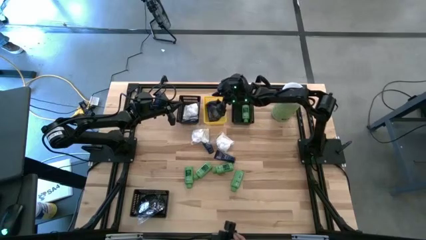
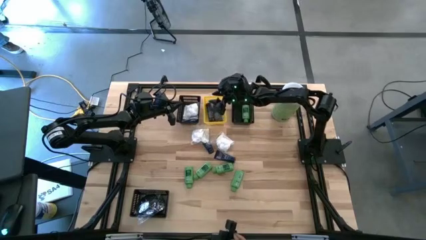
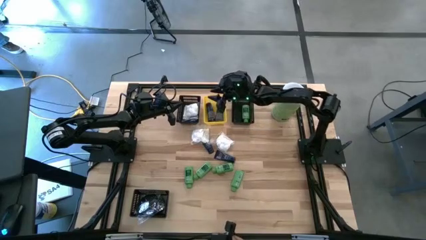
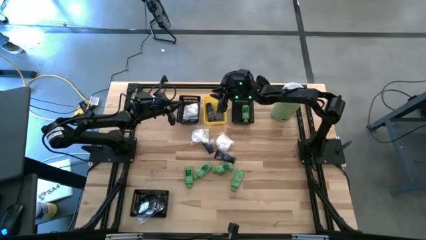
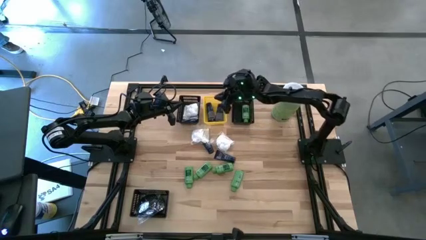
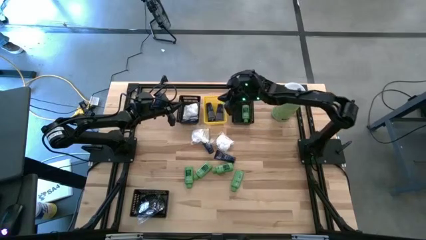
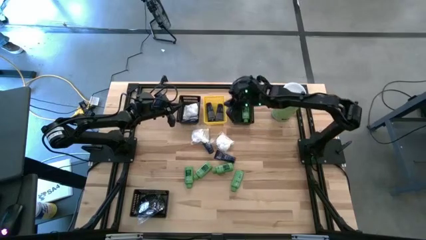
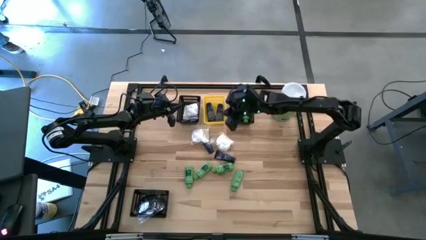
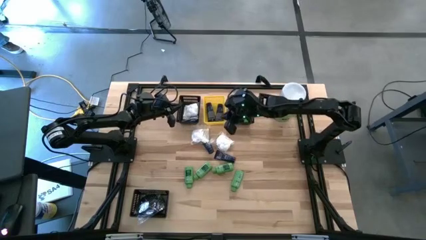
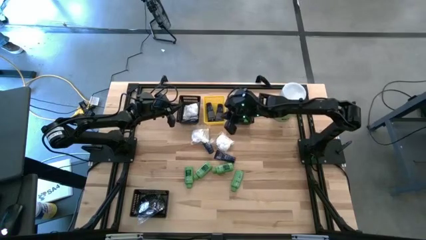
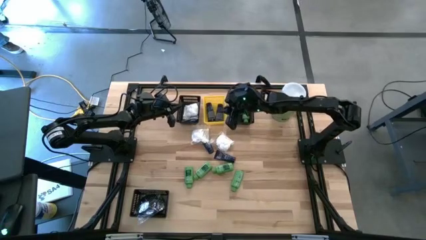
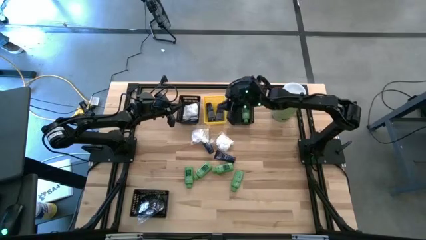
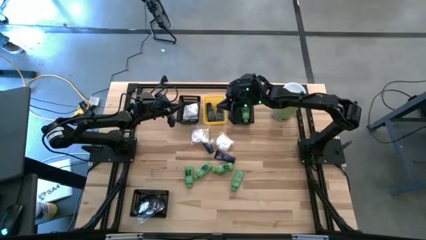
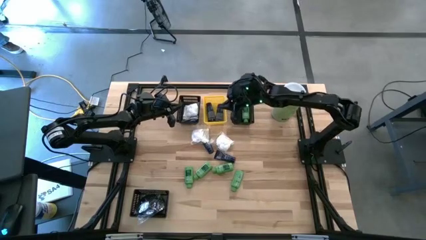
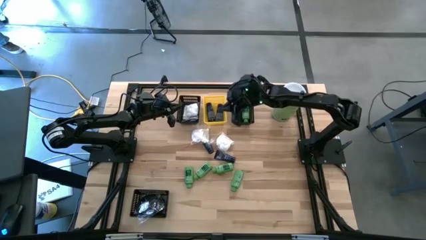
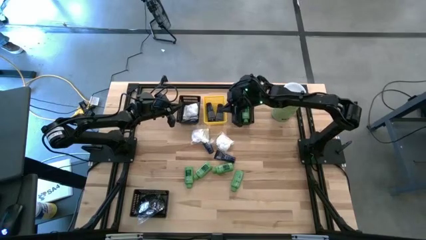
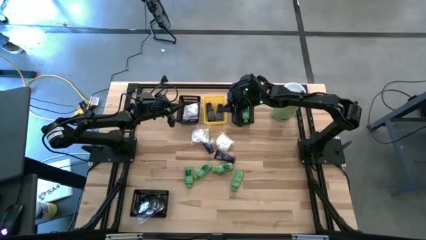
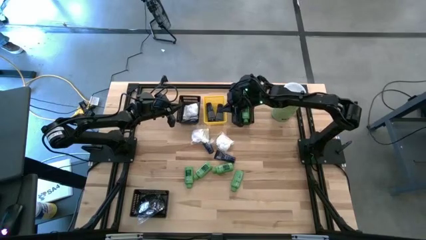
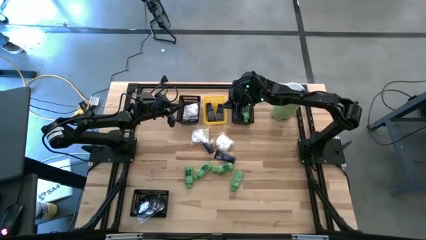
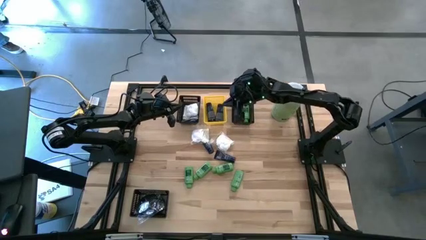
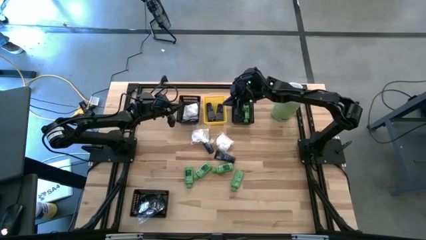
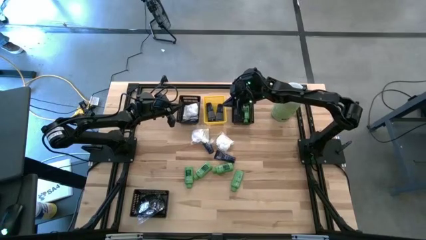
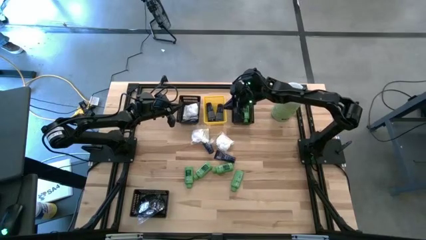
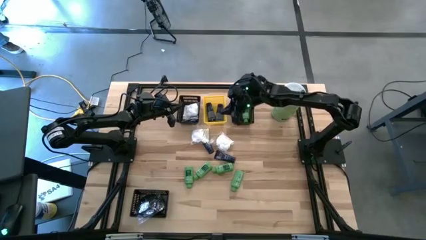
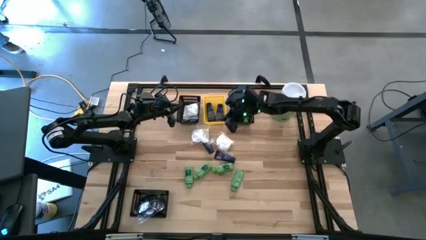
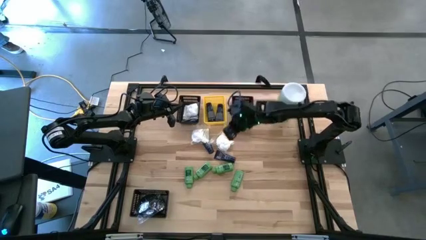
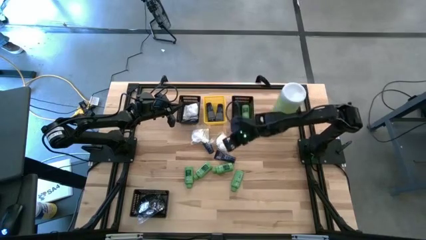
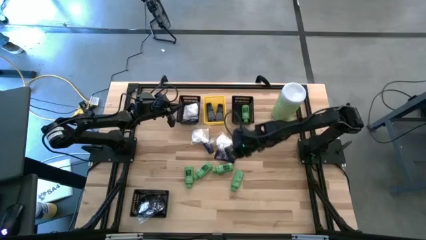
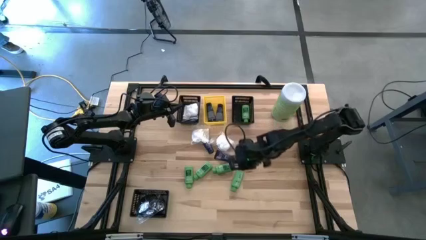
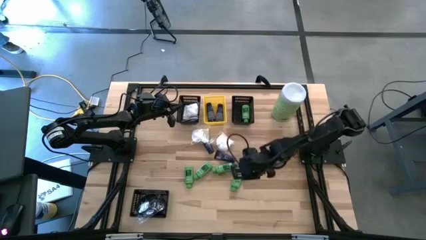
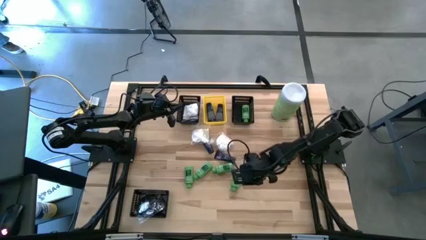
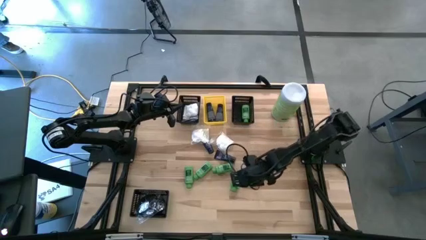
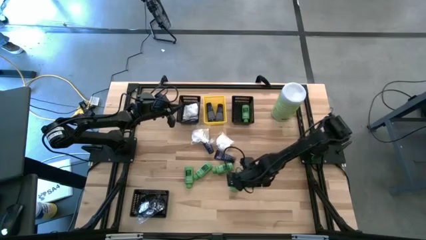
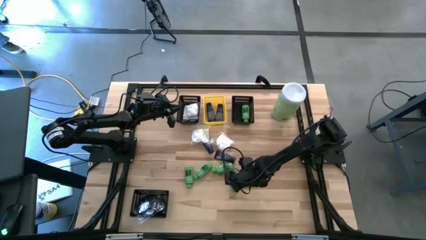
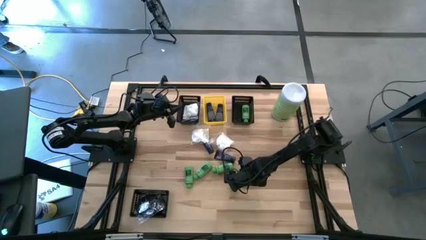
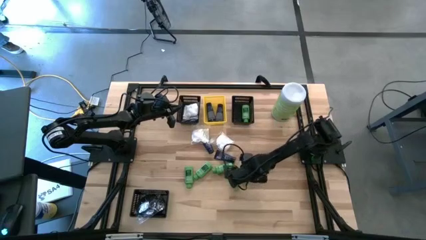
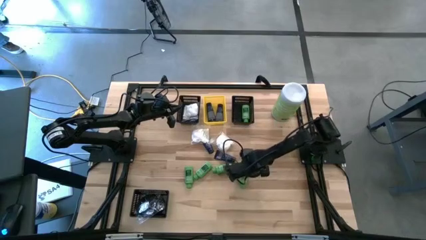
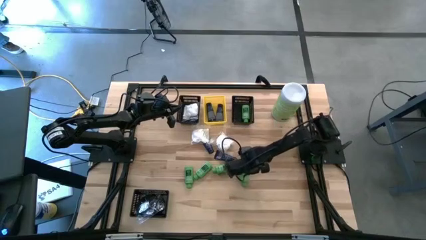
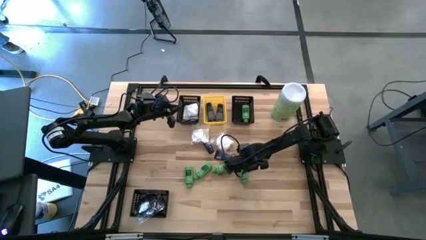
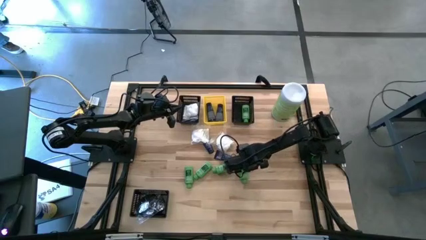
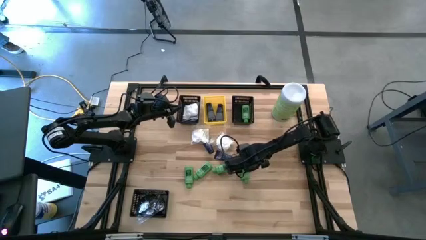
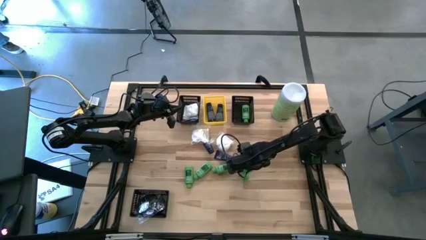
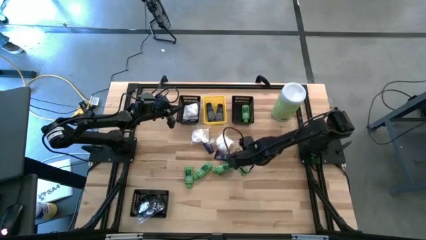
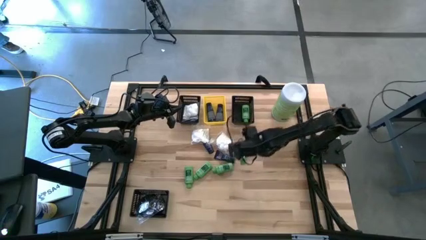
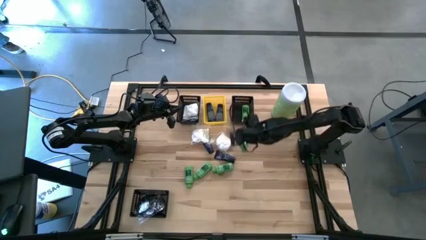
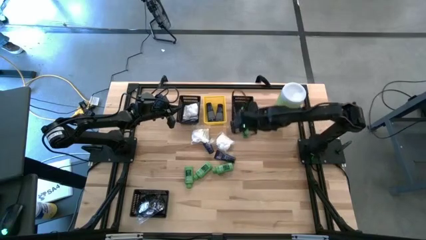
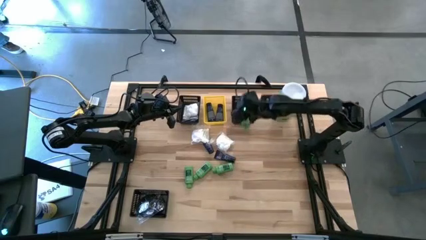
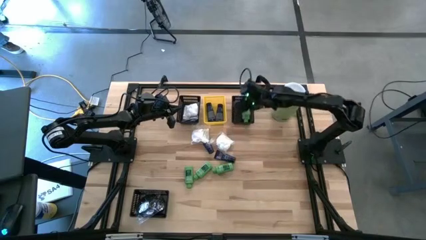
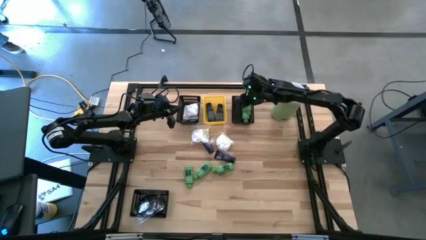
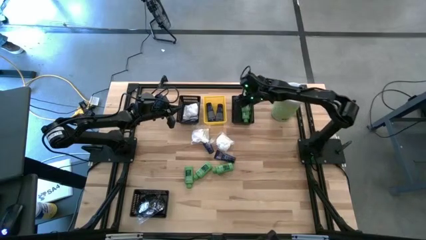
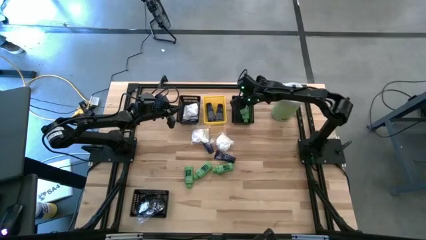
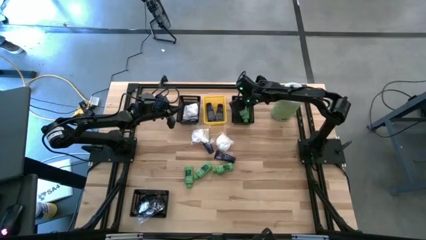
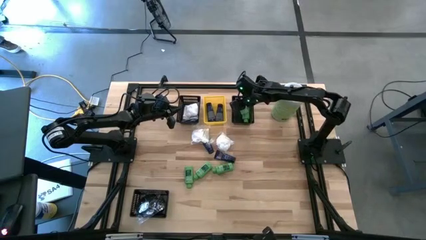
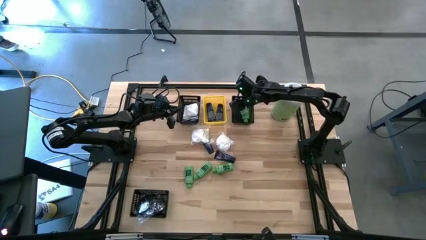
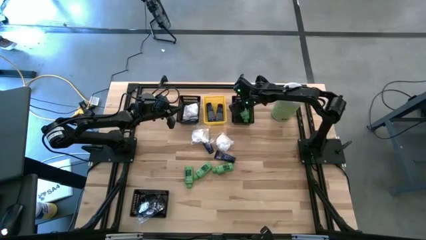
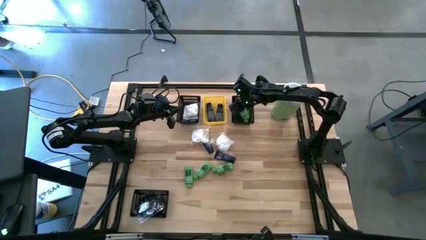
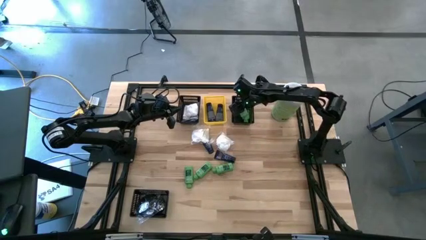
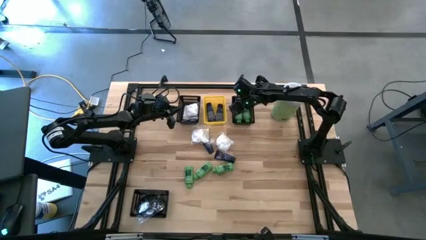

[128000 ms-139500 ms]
Task: Pick & Place Travel size toiletries
Put the green shampoo bottle into the top right black bin

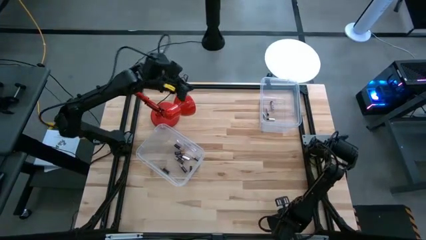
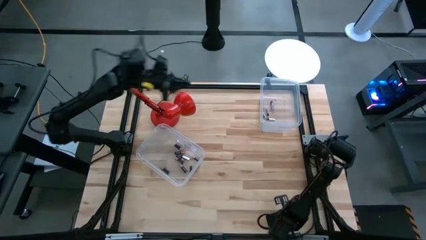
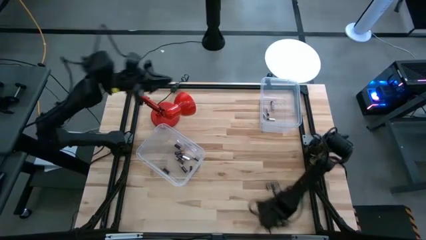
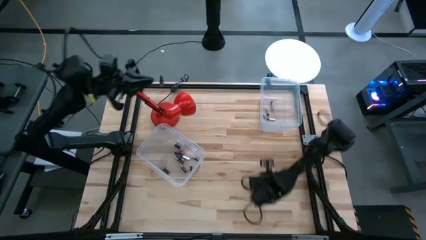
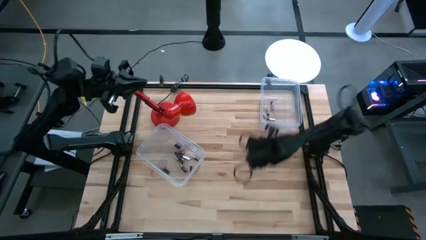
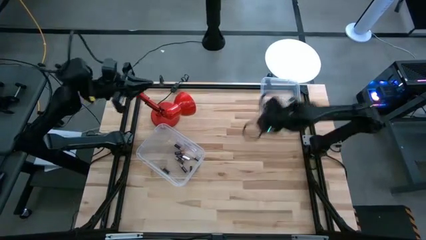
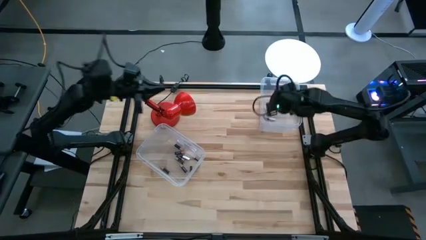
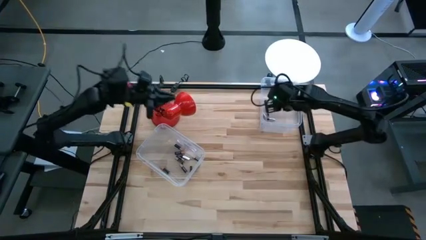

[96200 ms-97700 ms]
Task: Sort batteries
Put the silver battery into the top transparent bin

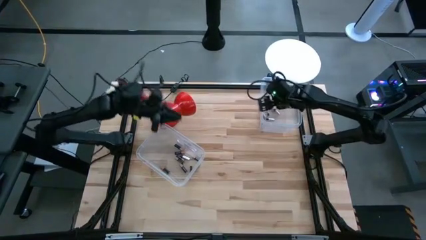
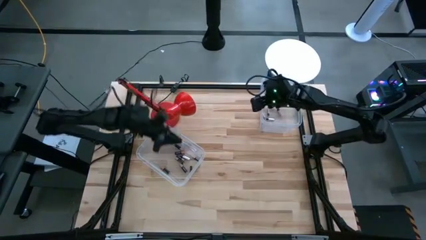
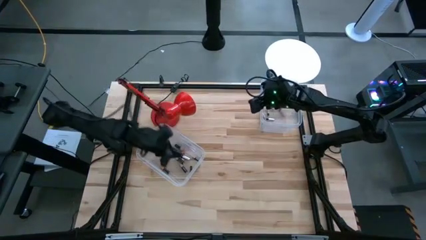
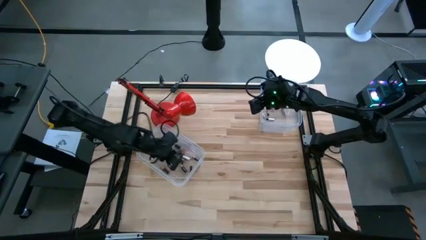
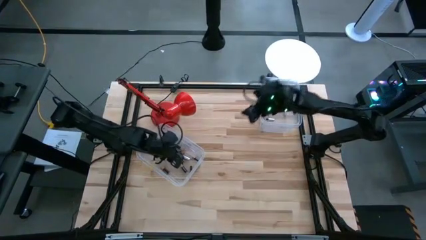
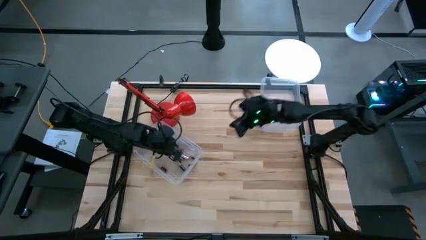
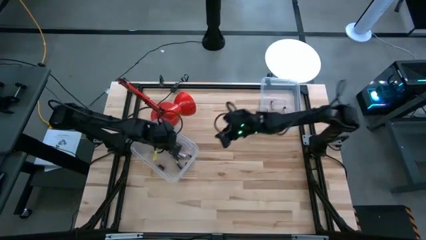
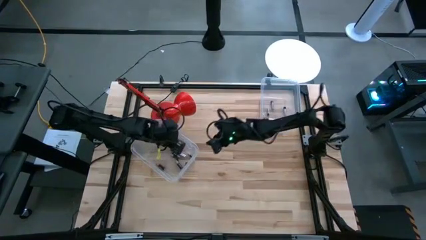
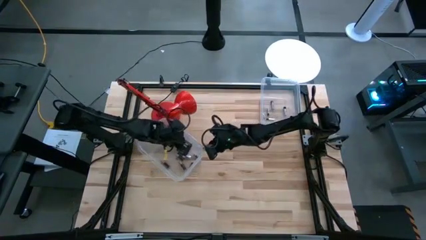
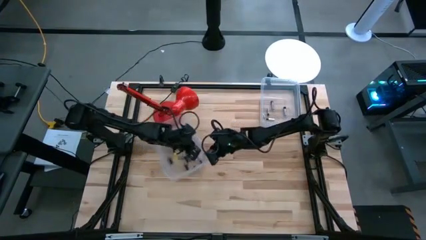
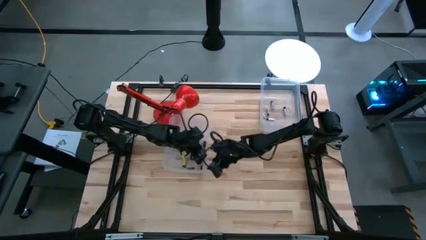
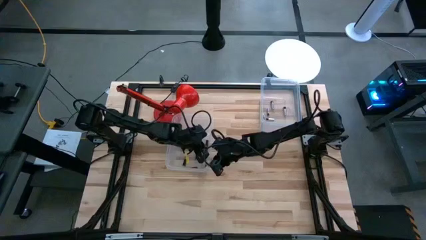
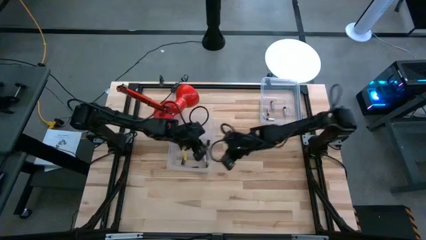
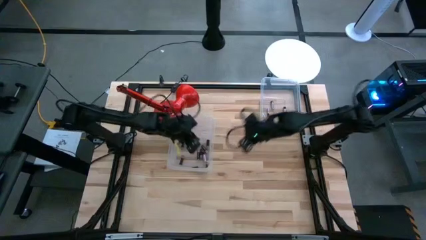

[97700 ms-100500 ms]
Move the bottom transparent bin to the center of the table
